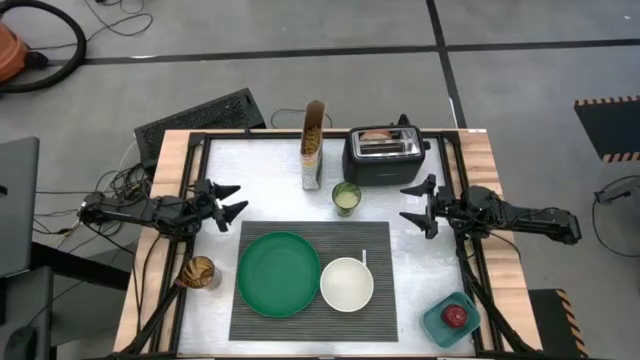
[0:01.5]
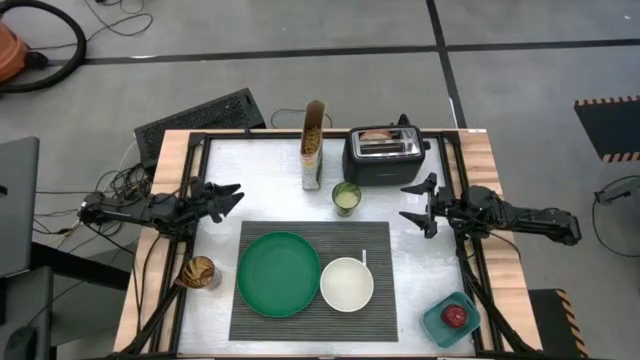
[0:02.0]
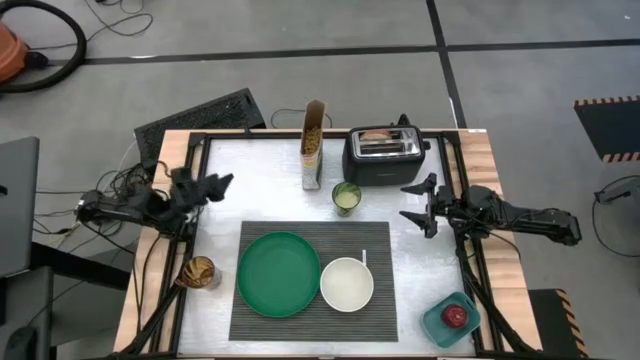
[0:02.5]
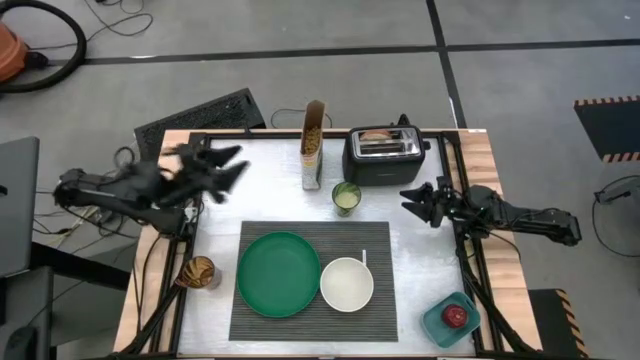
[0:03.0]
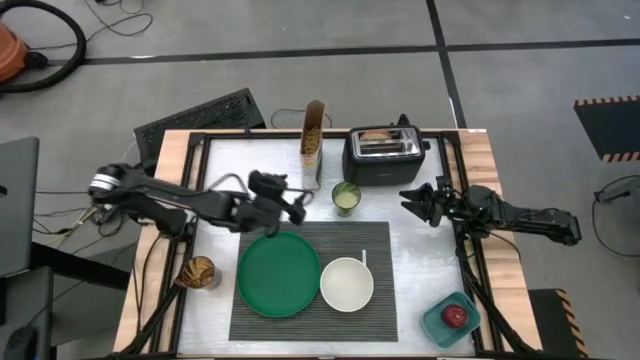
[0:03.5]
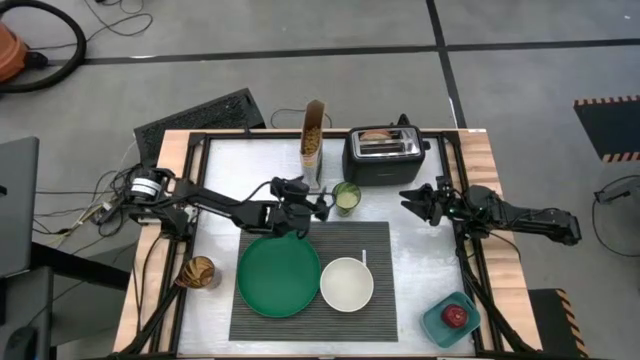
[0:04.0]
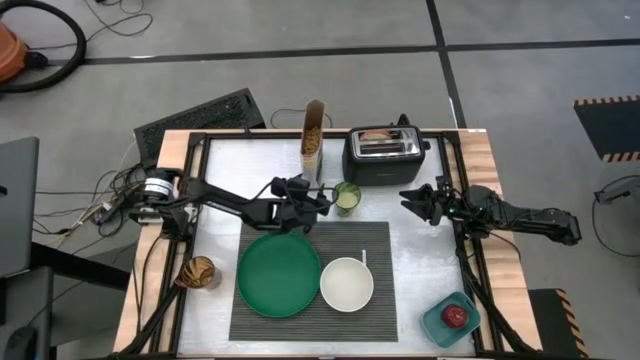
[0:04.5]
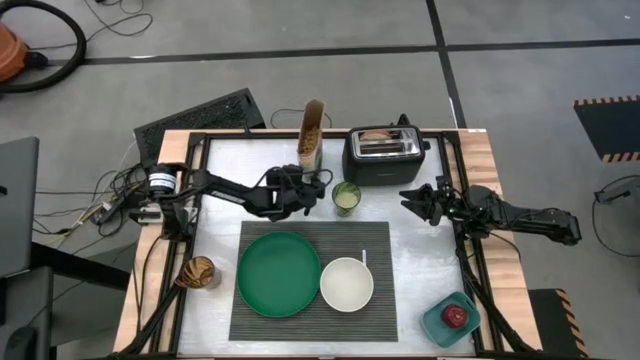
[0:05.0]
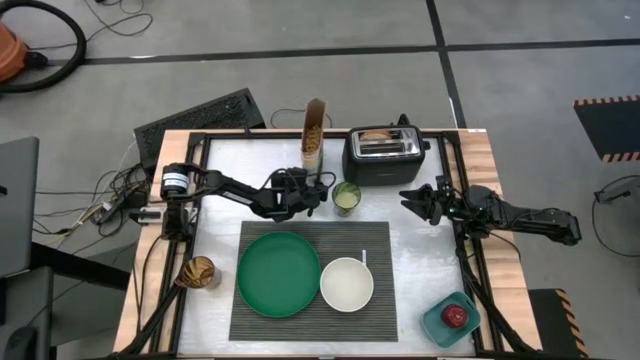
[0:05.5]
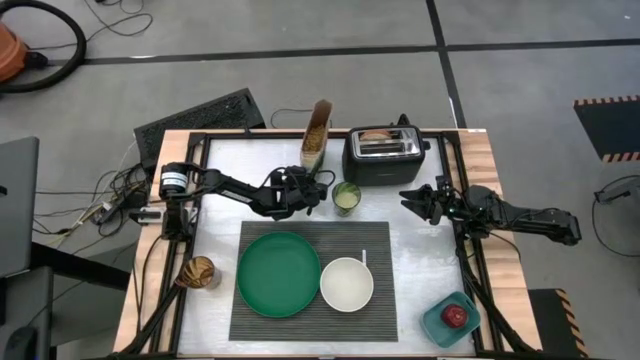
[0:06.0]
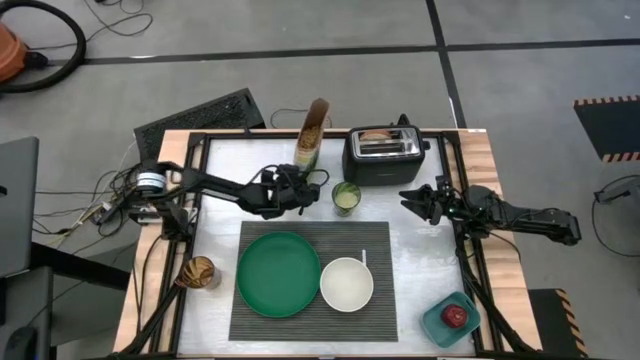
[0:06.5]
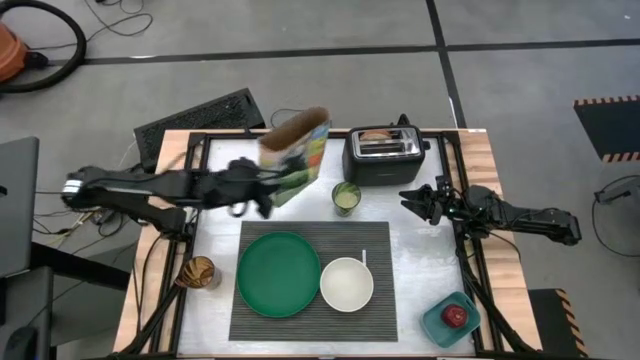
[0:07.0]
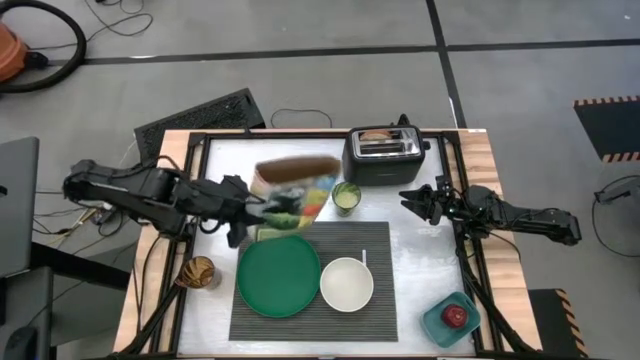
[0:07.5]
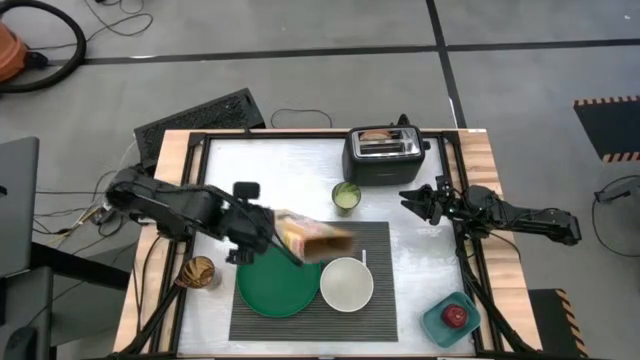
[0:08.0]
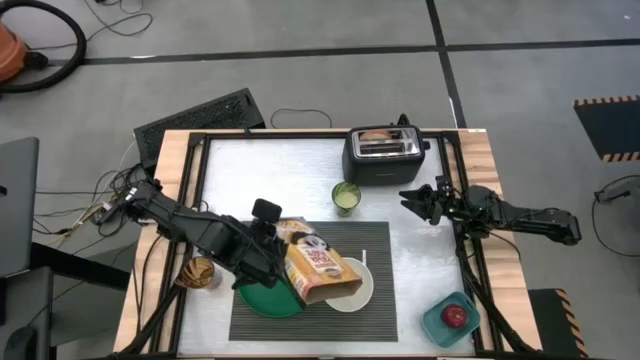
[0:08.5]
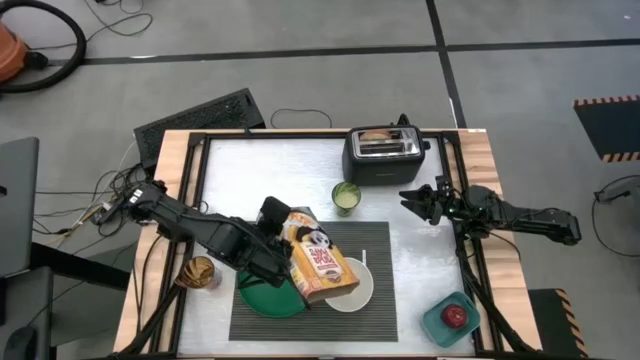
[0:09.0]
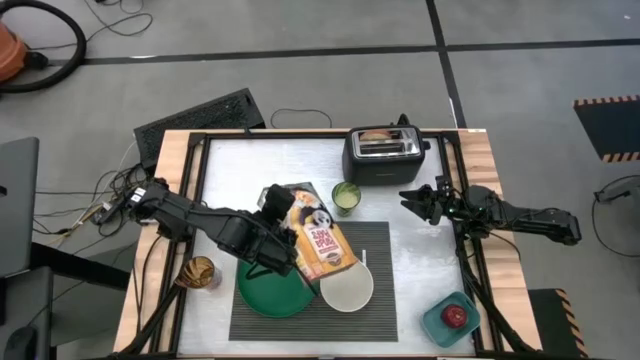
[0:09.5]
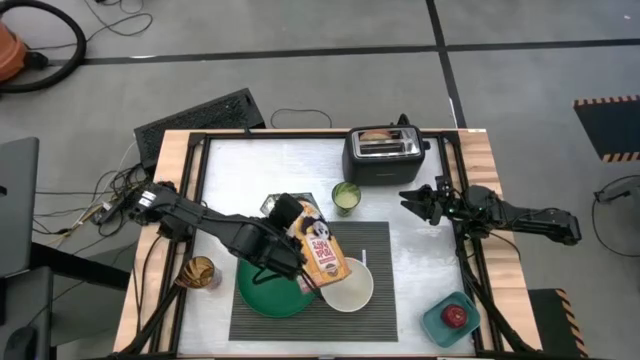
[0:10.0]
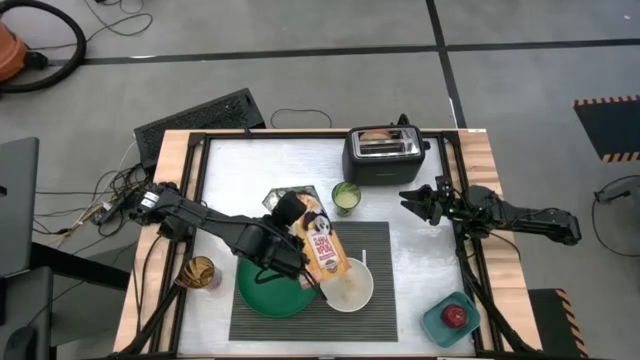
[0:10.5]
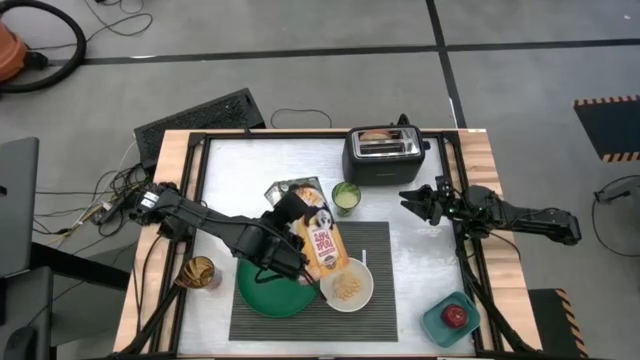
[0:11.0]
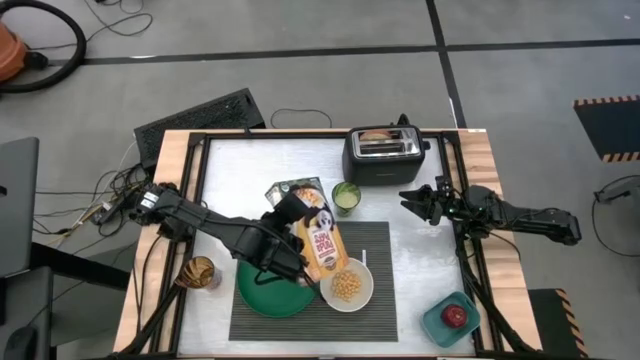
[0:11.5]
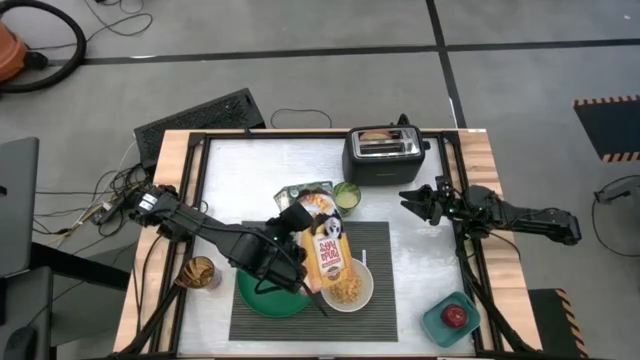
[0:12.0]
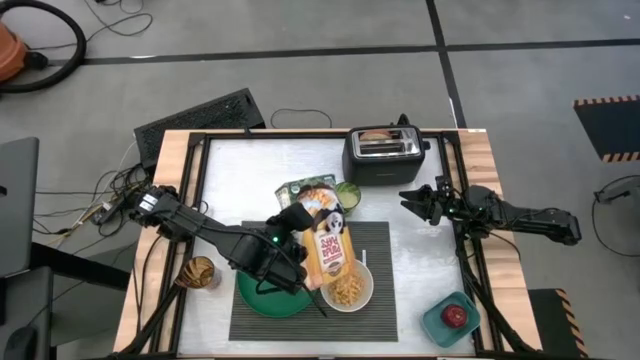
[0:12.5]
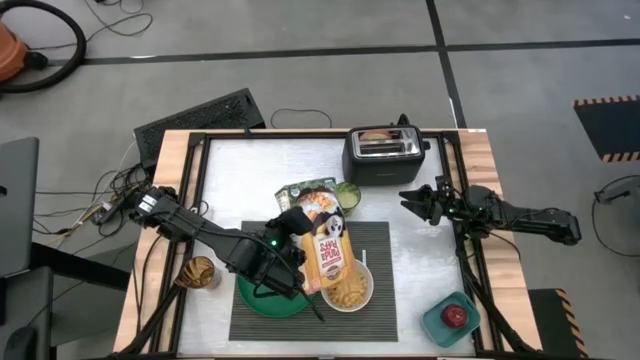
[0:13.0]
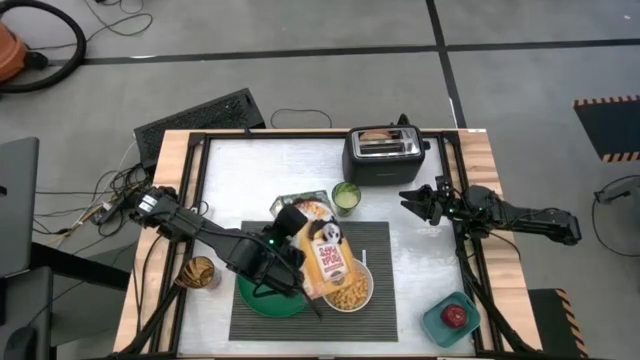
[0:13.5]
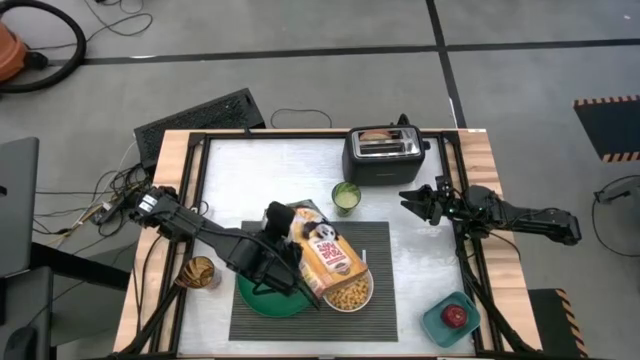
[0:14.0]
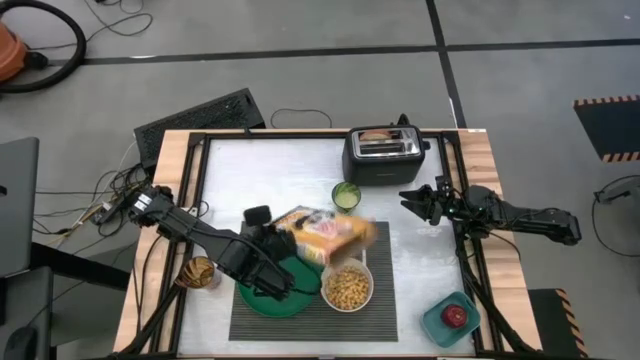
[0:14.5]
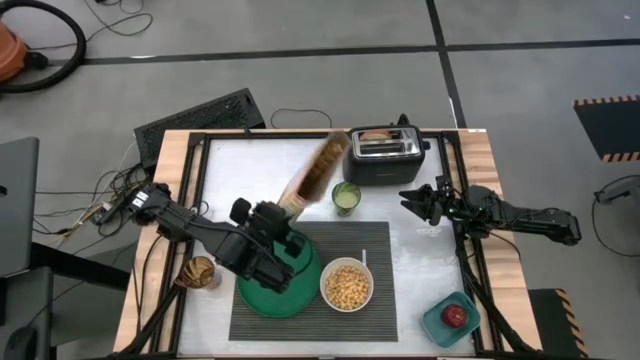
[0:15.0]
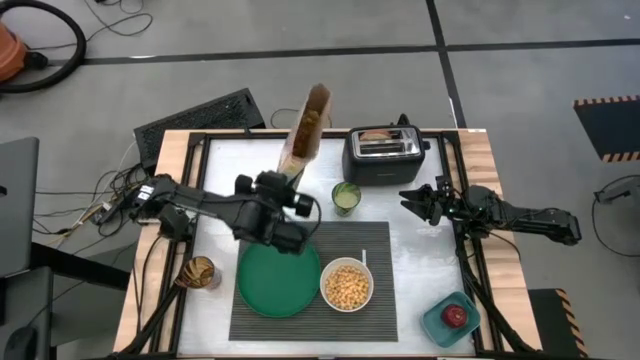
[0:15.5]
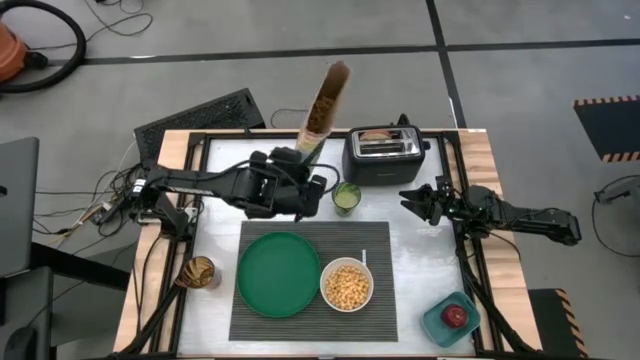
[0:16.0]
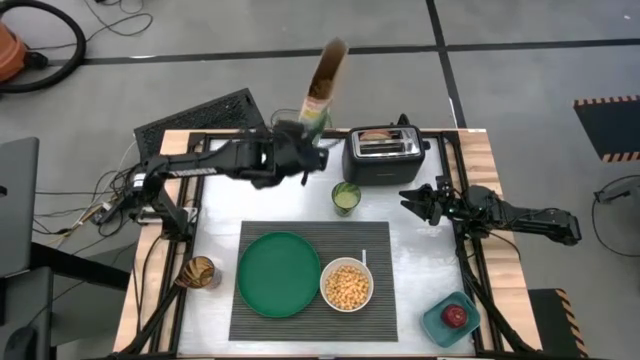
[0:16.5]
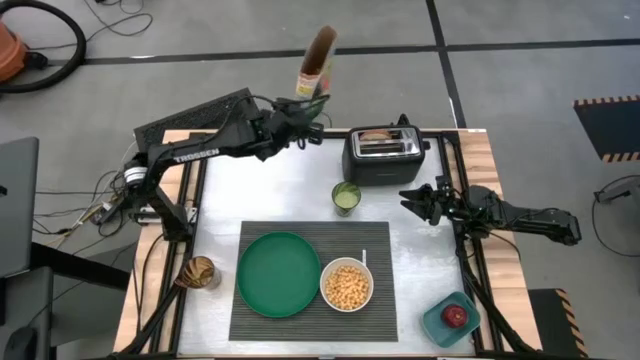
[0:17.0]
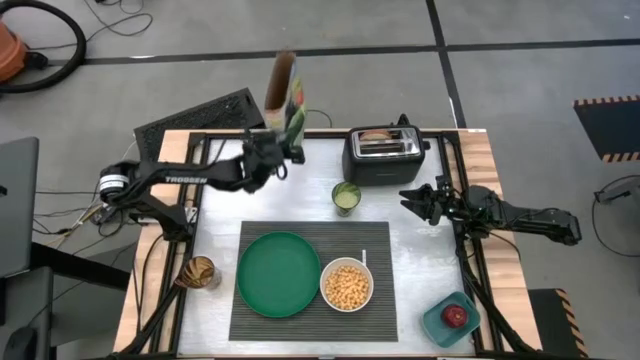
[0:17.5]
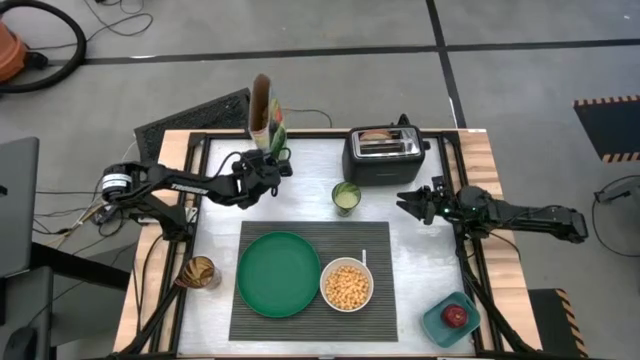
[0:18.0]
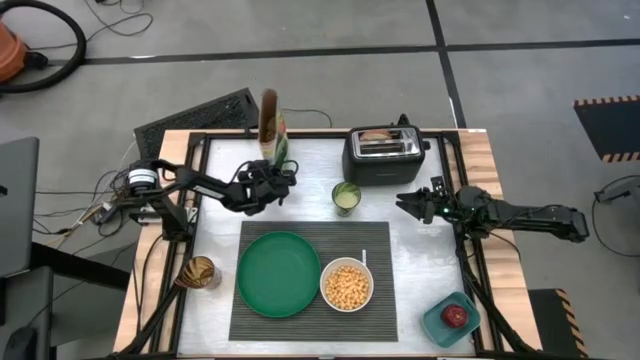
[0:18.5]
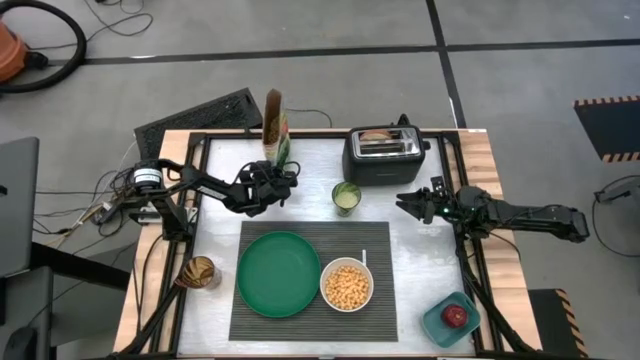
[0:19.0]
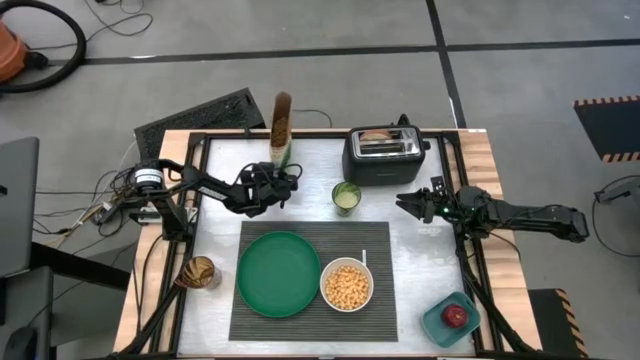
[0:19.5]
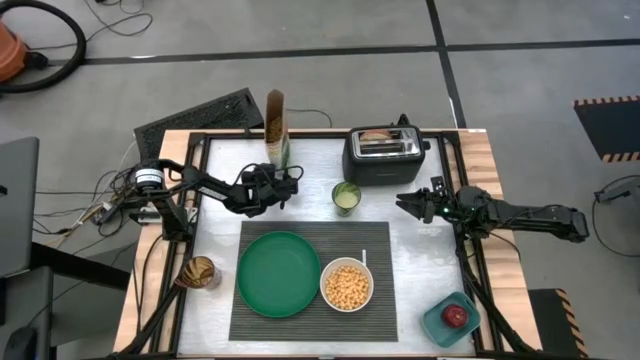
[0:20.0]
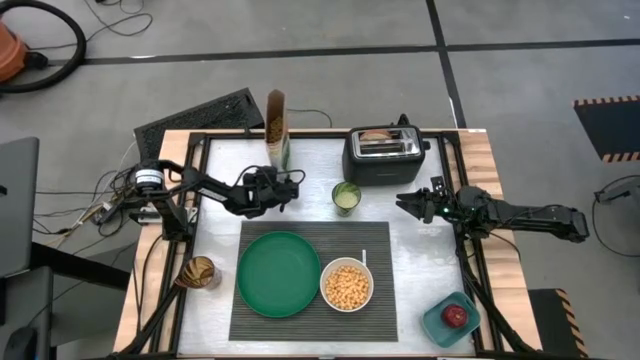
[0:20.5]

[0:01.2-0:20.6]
Task: Arrange a breakfast setting
Pour the cereal into the white bowl
